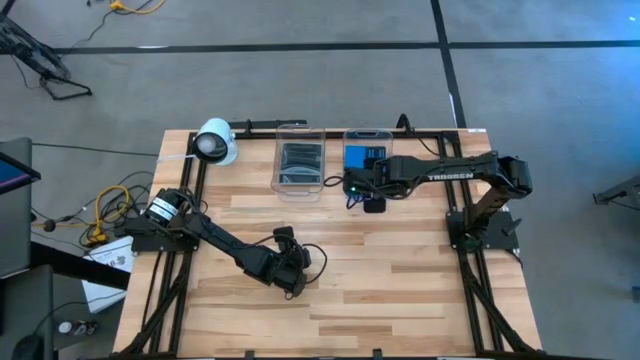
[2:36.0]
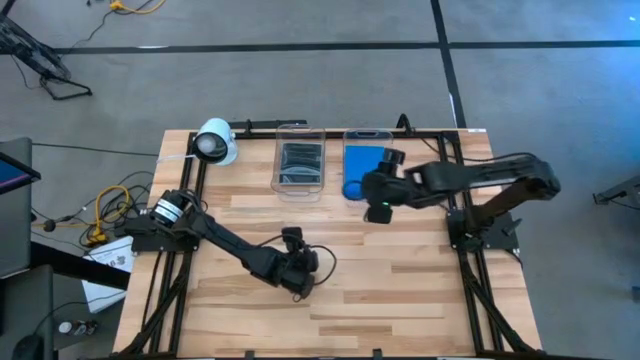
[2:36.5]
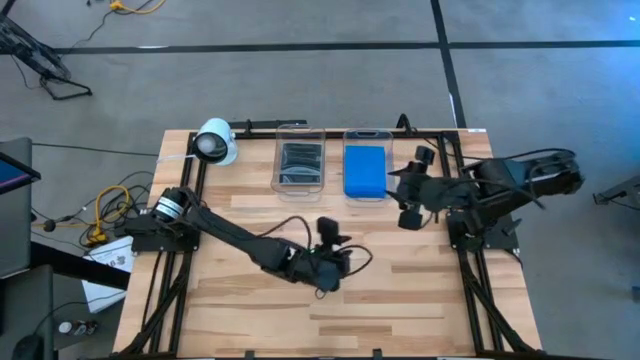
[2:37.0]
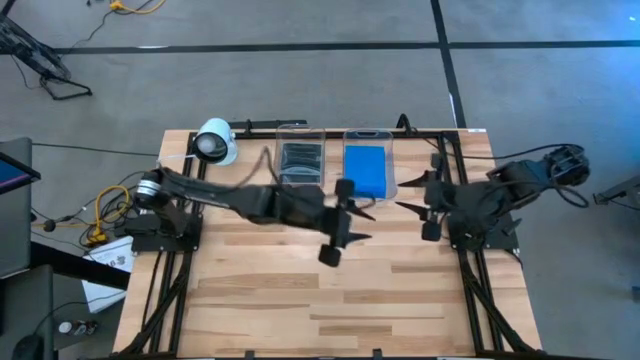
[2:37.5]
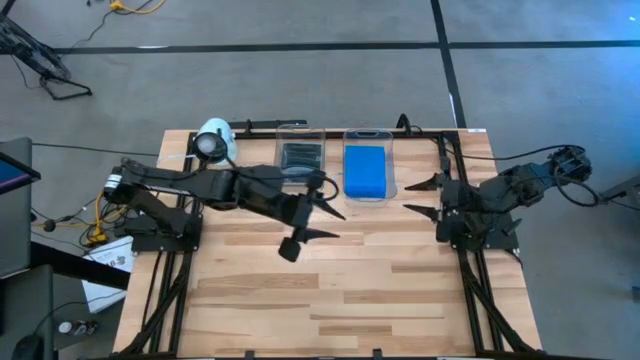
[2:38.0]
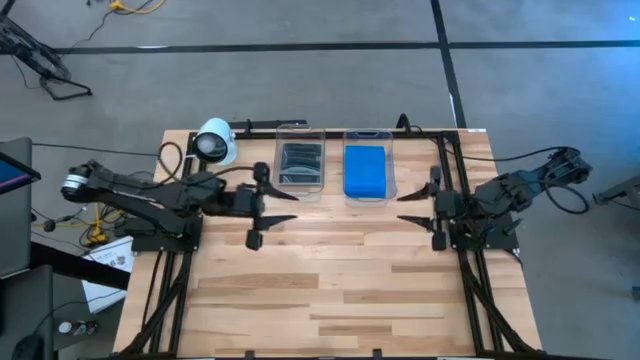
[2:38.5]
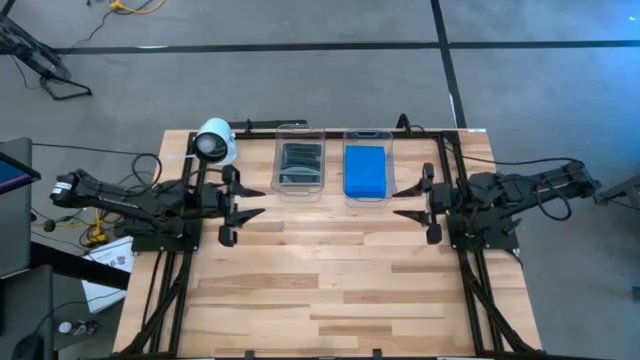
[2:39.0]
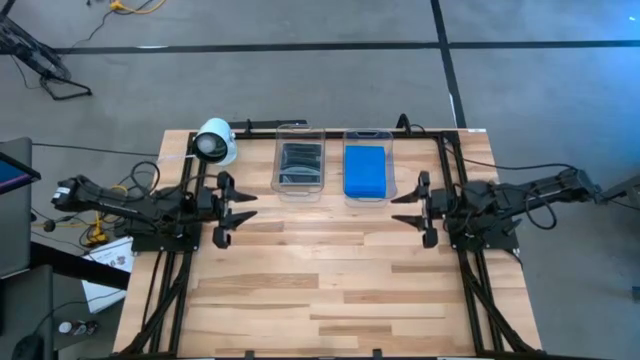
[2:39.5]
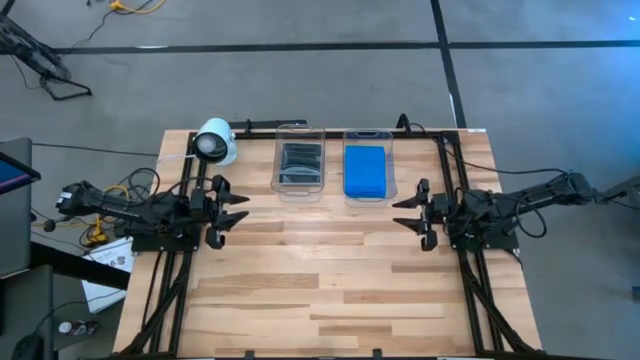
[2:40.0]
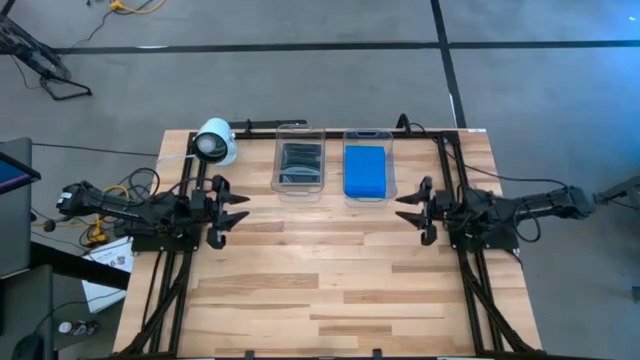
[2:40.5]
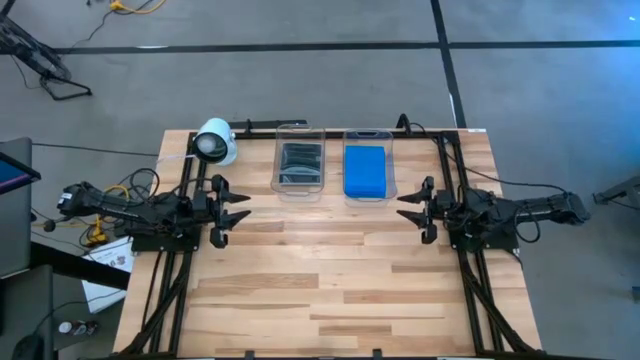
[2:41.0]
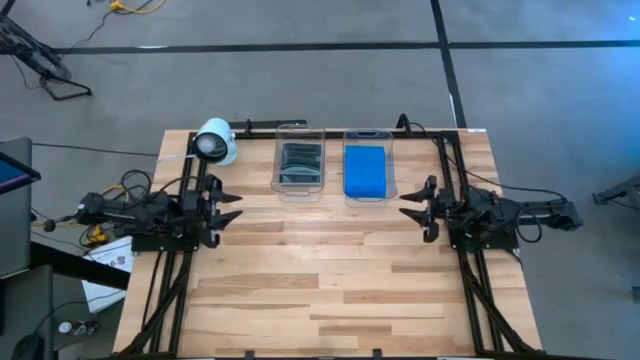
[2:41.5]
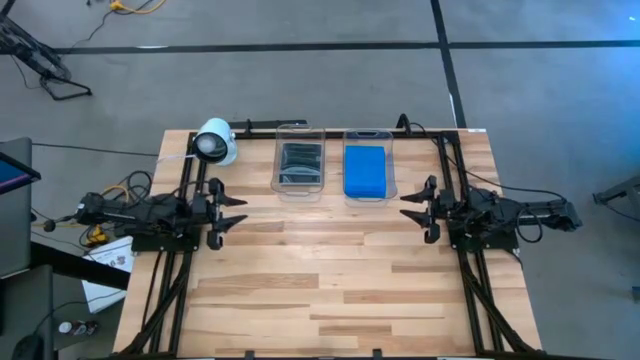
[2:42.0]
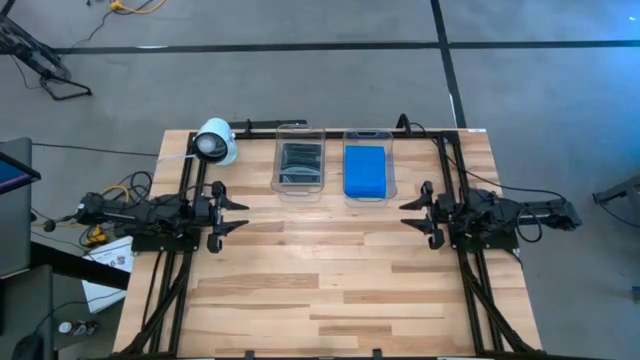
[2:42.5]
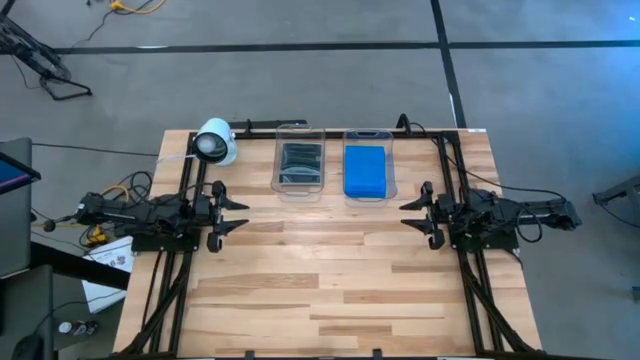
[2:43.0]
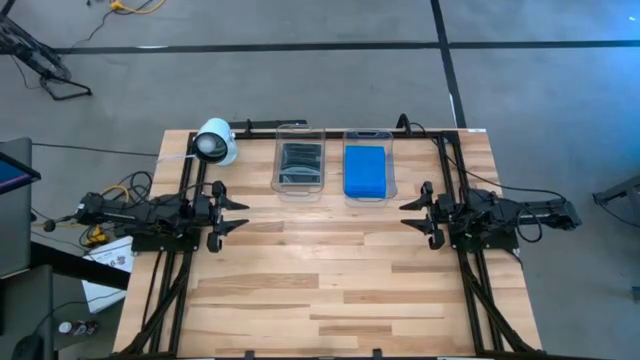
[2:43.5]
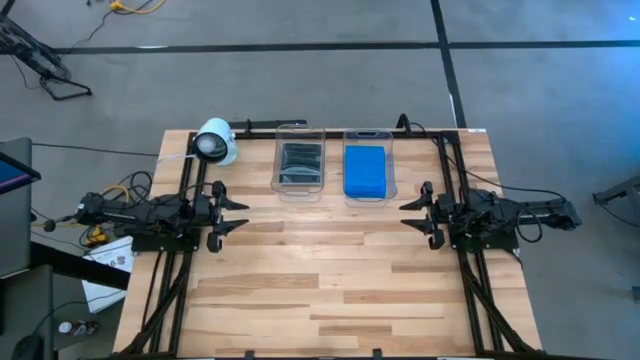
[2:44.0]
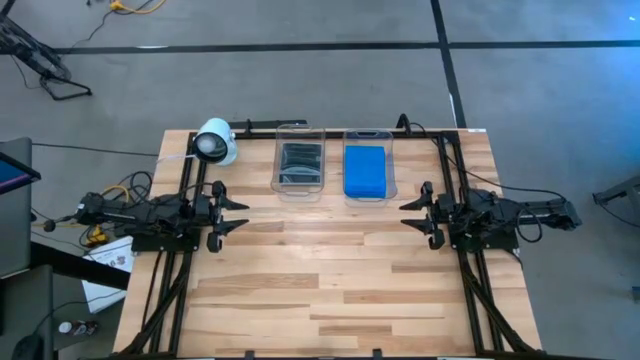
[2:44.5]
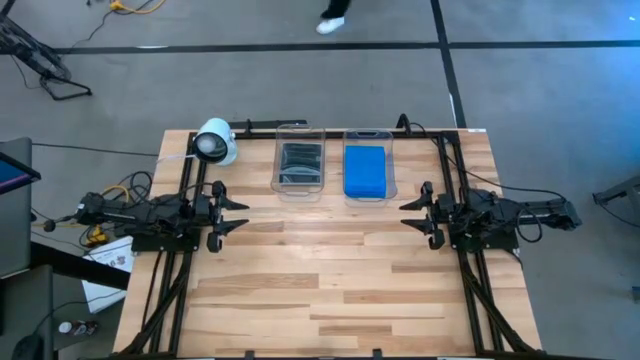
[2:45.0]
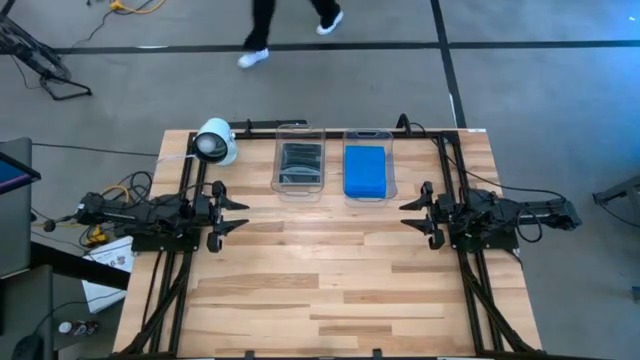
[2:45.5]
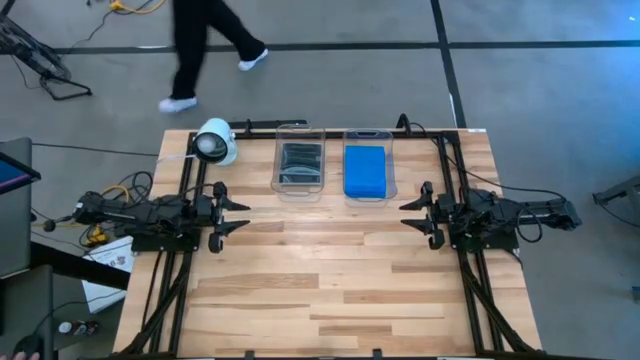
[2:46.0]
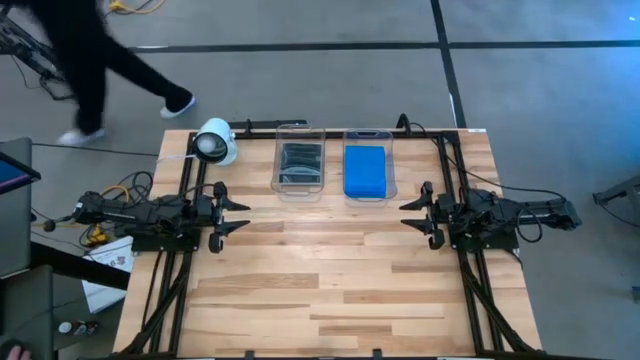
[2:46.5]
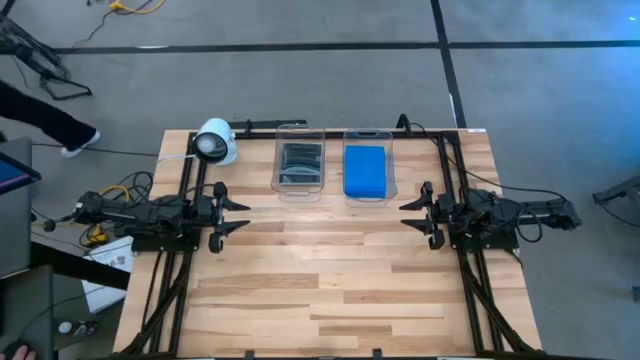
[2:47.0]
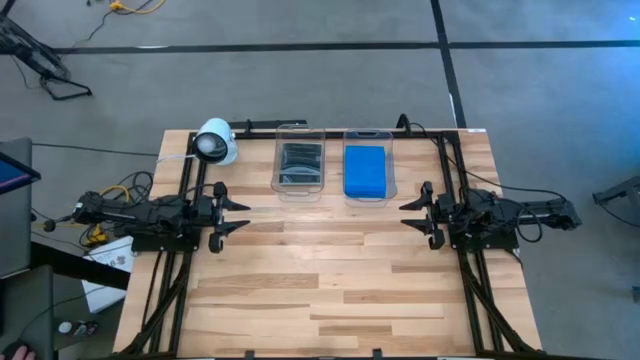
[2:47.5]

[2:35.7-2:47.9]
Task: Pick & place jewel cases by type
Return to Home Position

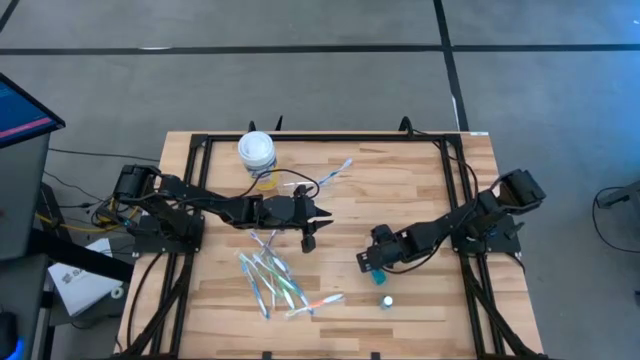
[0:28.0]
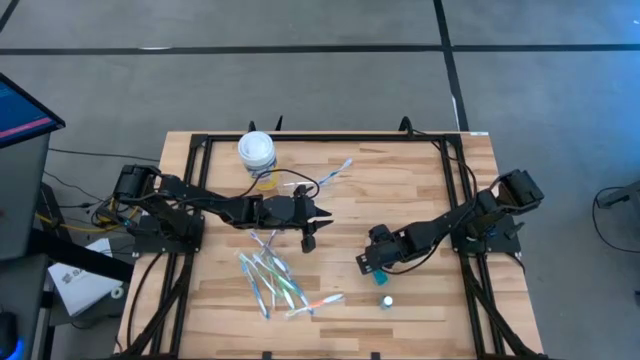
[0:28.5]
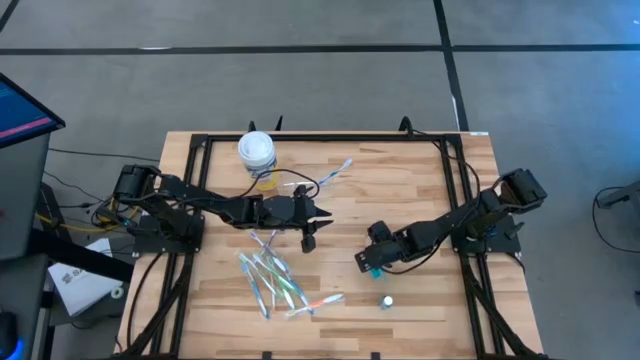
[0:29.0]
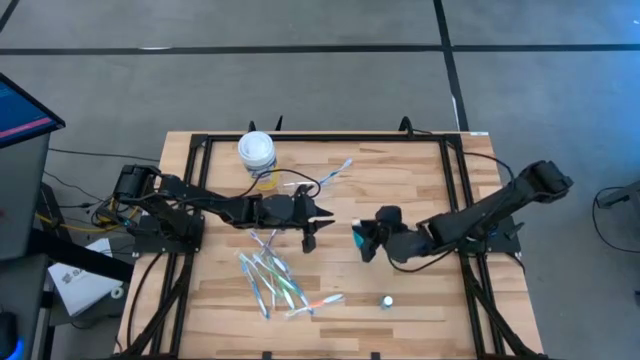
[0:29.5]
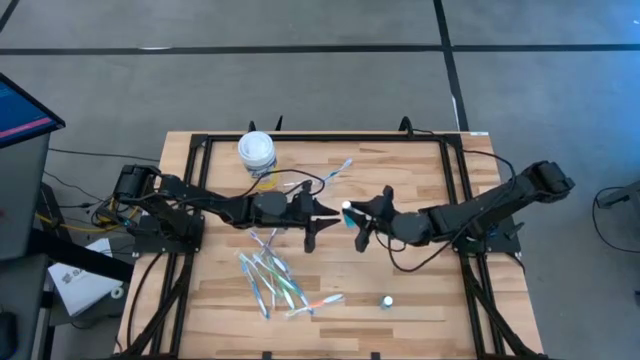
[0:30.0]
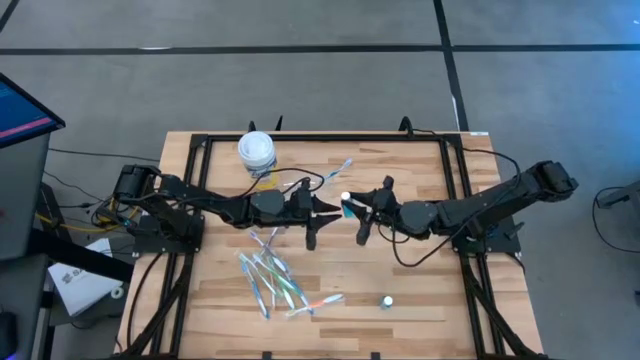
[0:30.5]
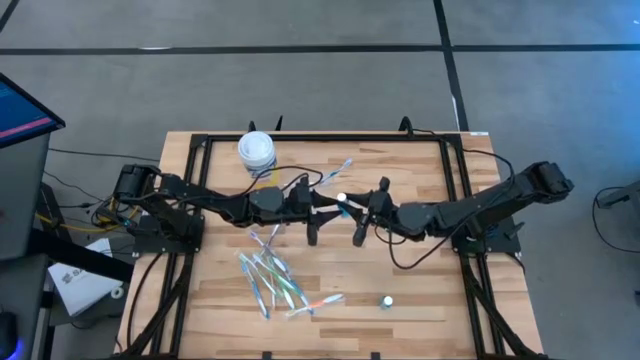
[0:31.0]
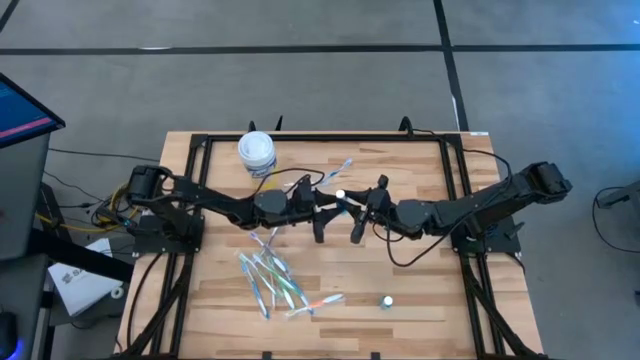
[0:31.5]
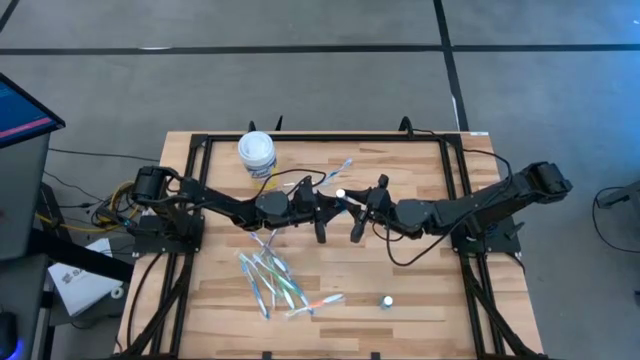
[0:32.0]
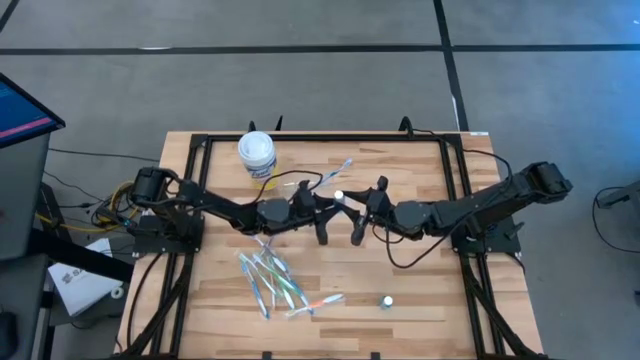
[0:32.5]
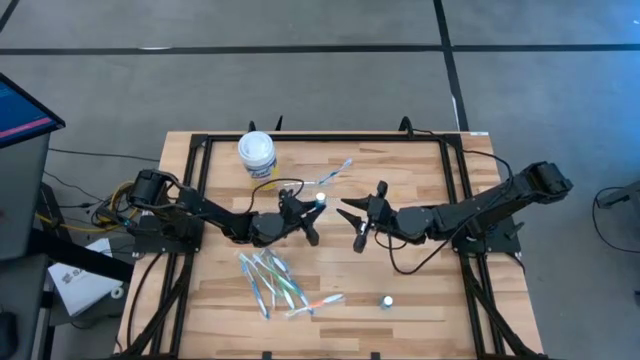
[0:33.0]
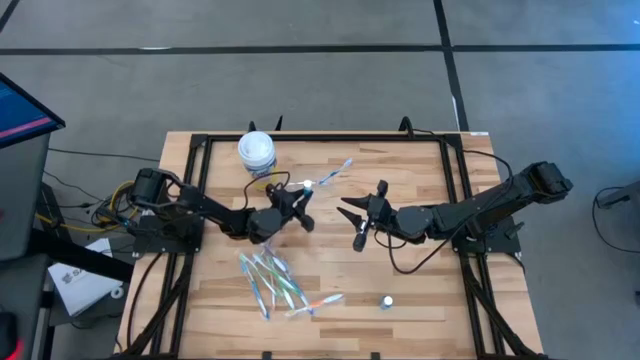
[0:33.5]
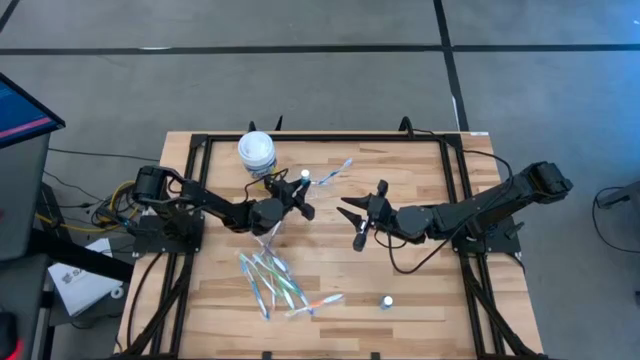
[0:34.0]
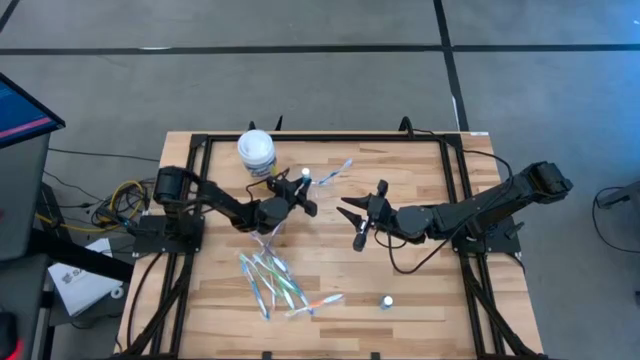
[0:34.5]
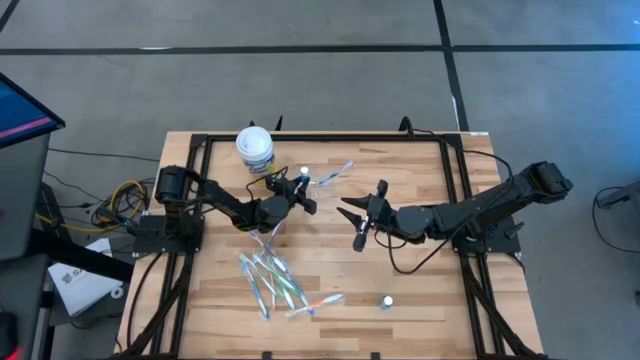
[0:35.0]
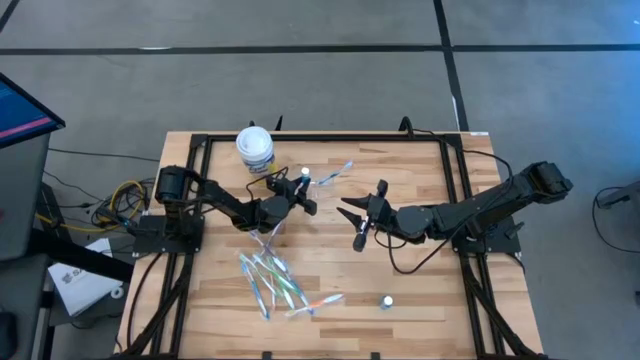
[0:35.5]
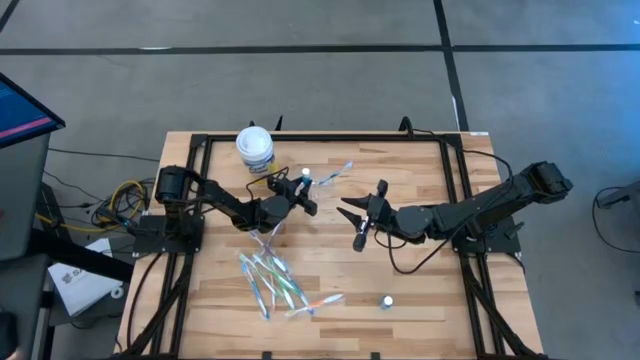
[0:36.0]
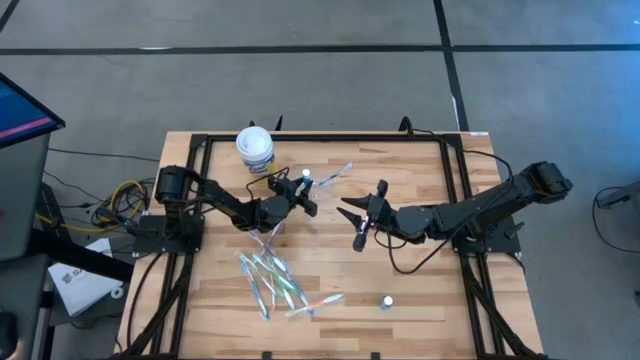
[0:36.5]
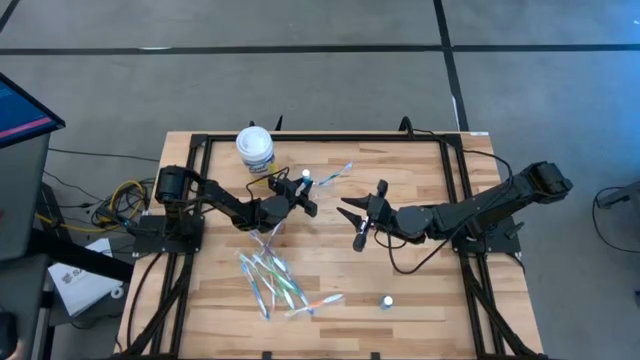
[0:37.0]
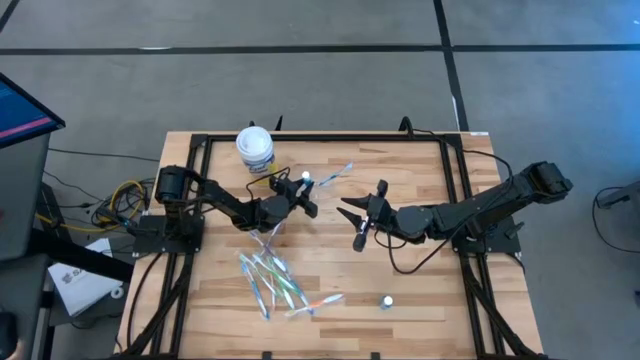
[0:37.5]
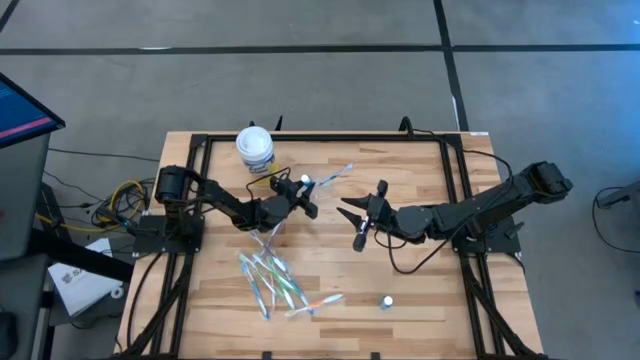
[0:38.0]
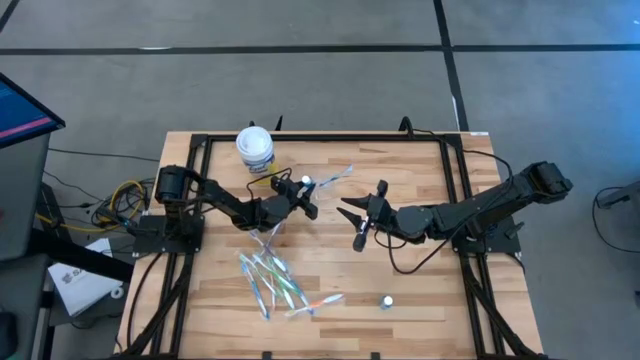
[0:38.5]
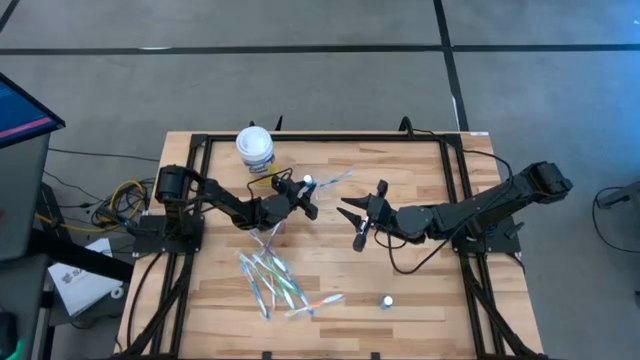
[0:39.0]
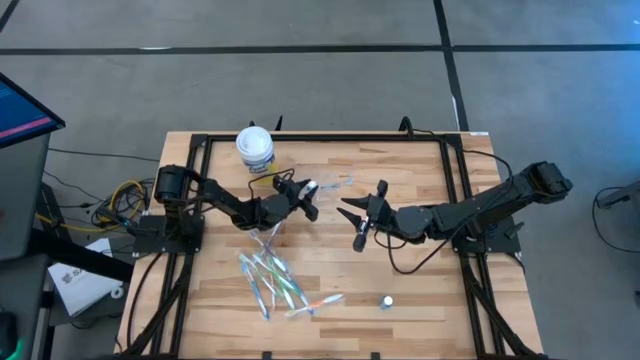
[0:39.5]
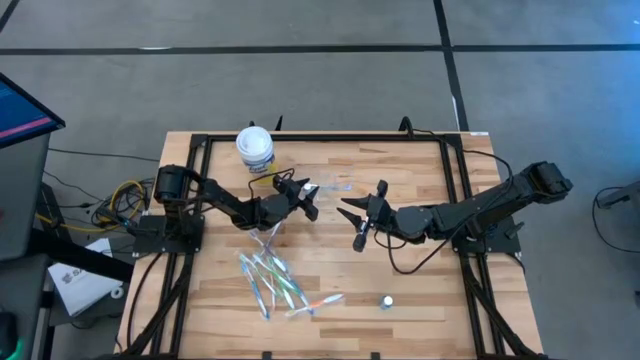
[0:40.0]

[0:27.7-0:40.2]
Task: Pick & Place toothbrushing station
Put the blue mouthwash into the transparent organizer
